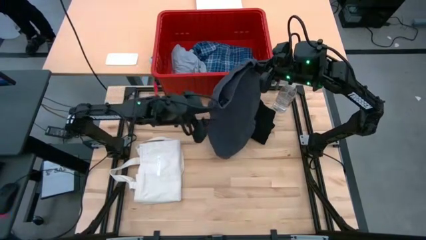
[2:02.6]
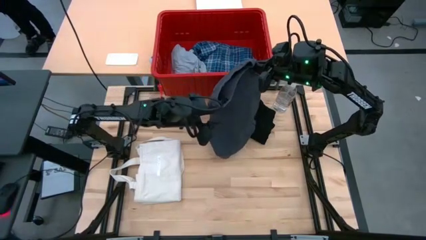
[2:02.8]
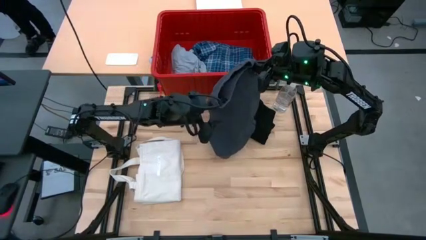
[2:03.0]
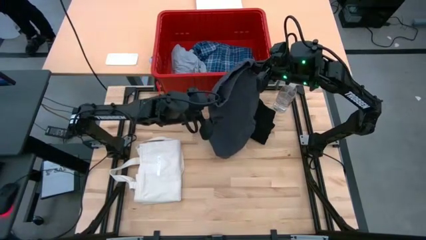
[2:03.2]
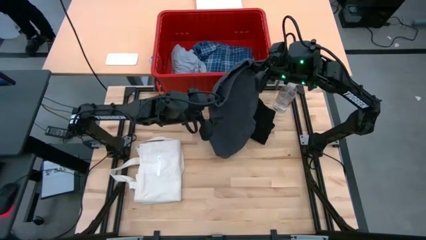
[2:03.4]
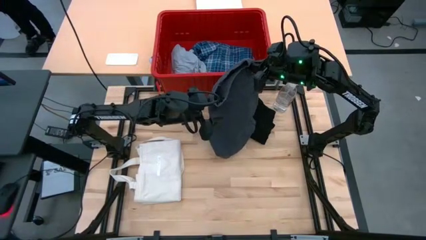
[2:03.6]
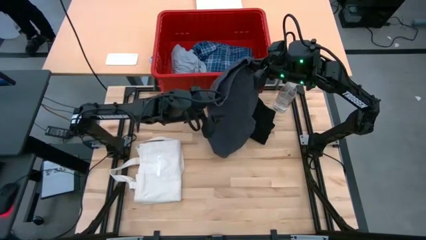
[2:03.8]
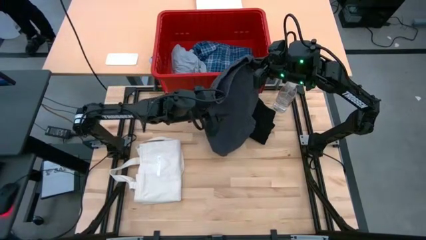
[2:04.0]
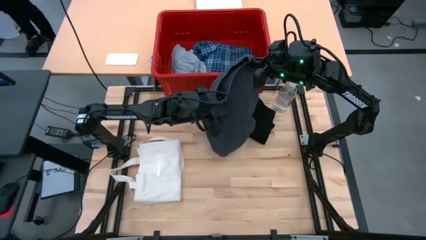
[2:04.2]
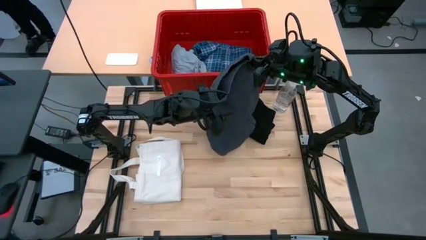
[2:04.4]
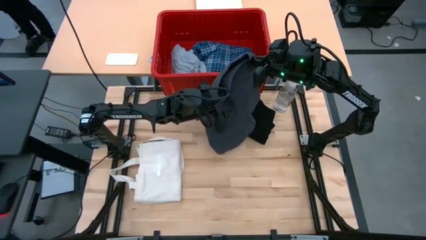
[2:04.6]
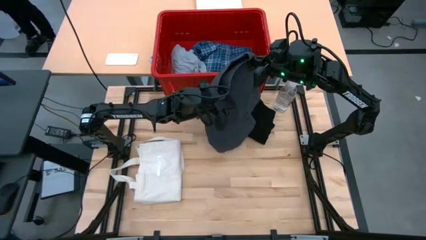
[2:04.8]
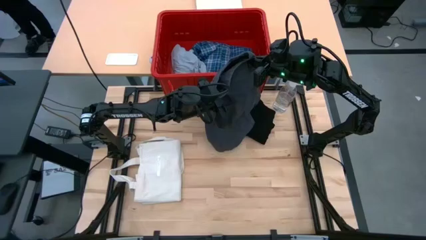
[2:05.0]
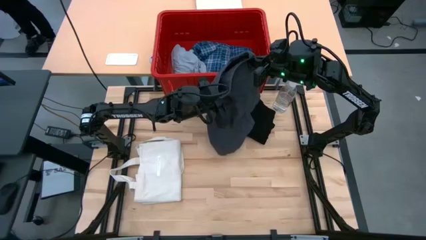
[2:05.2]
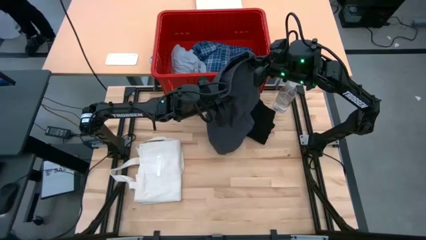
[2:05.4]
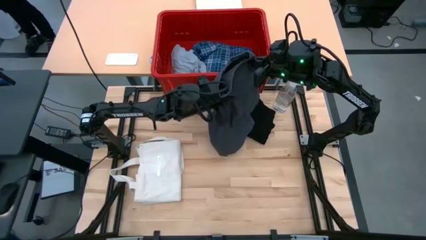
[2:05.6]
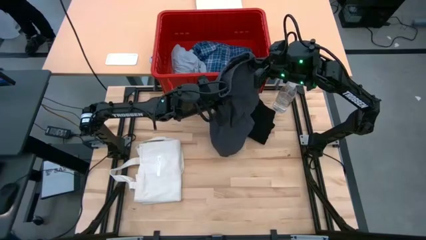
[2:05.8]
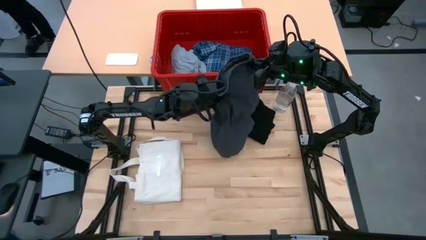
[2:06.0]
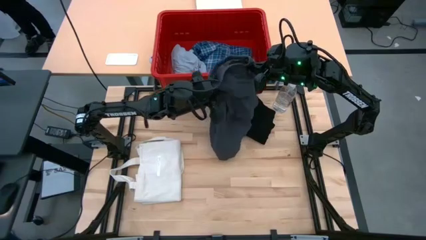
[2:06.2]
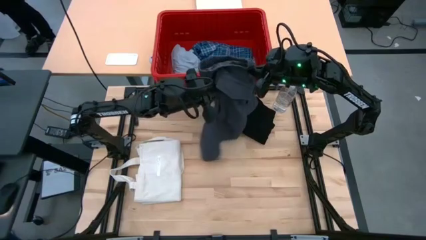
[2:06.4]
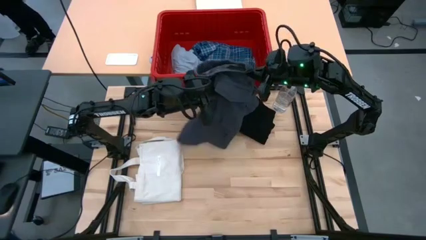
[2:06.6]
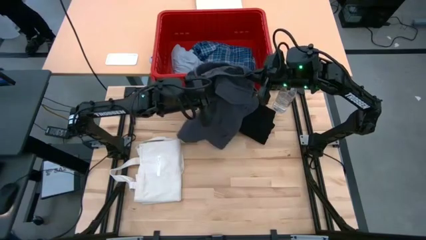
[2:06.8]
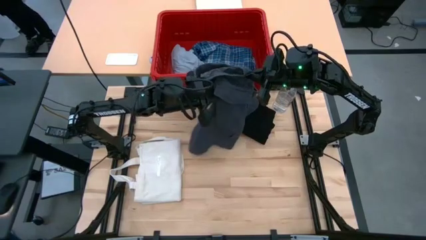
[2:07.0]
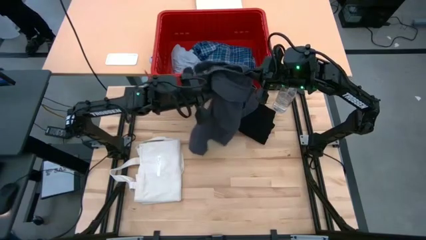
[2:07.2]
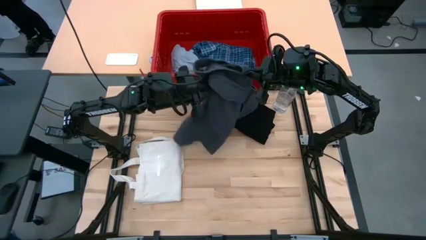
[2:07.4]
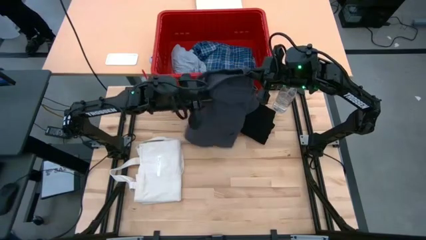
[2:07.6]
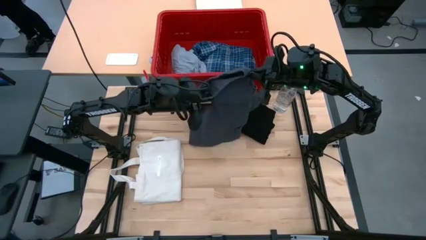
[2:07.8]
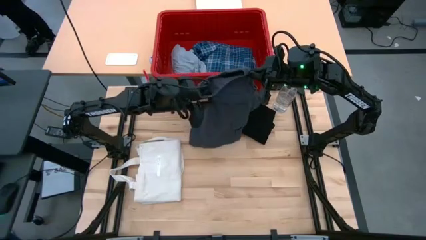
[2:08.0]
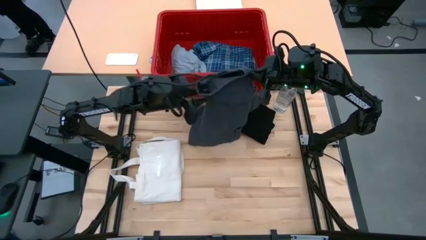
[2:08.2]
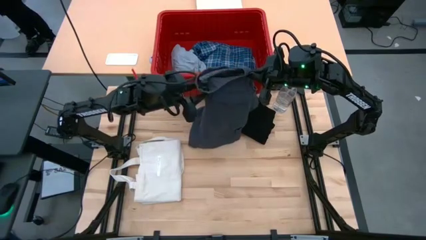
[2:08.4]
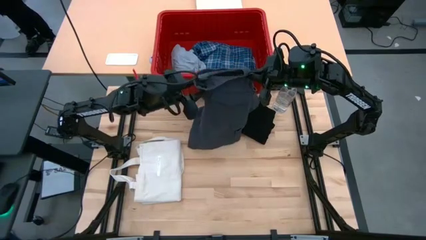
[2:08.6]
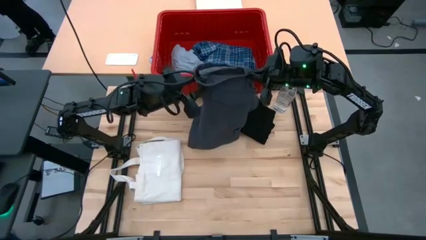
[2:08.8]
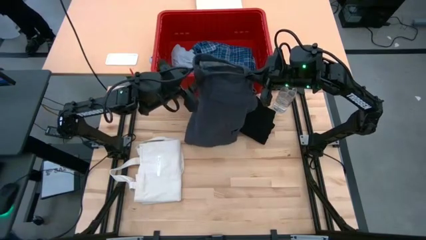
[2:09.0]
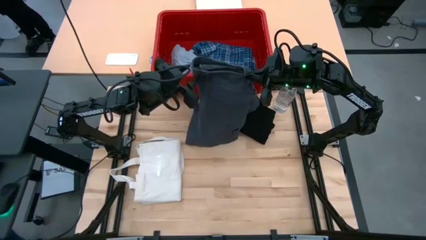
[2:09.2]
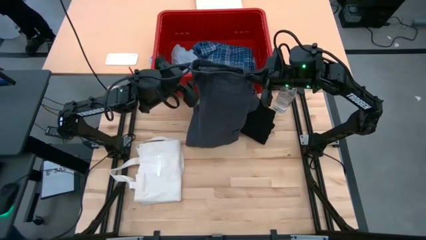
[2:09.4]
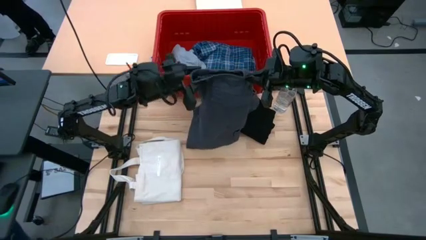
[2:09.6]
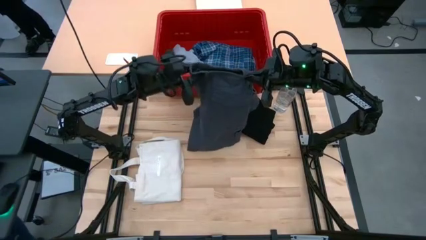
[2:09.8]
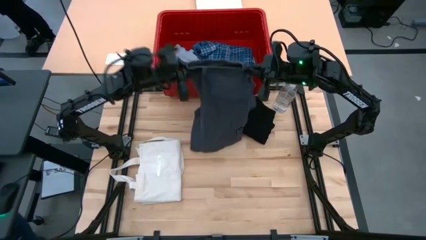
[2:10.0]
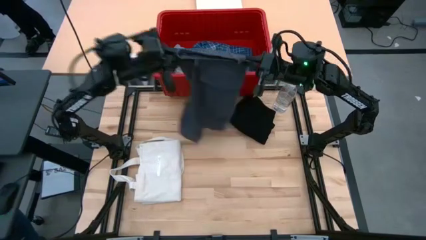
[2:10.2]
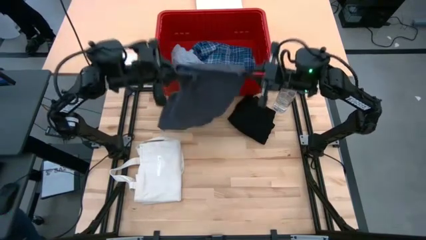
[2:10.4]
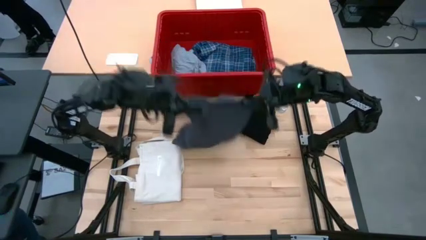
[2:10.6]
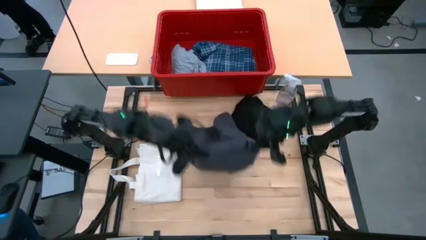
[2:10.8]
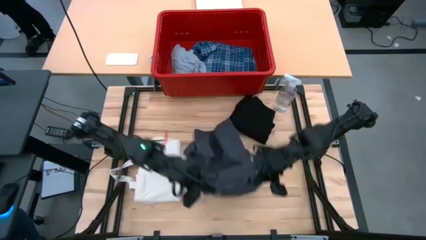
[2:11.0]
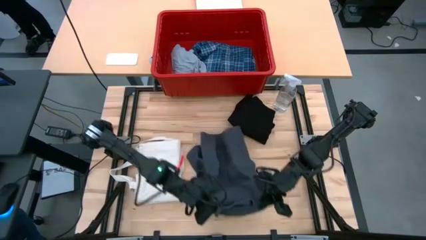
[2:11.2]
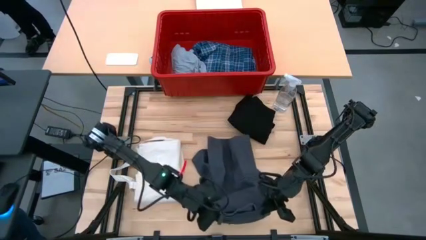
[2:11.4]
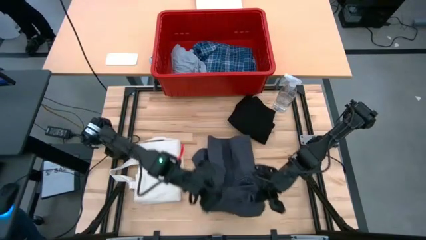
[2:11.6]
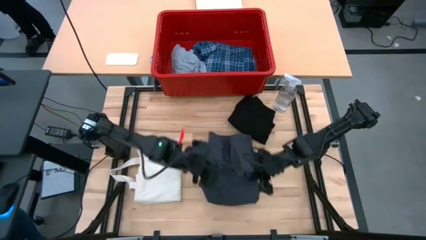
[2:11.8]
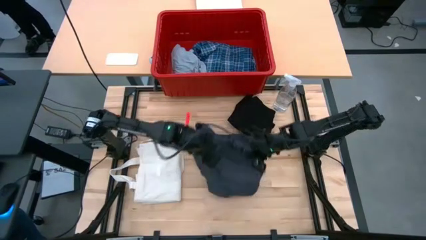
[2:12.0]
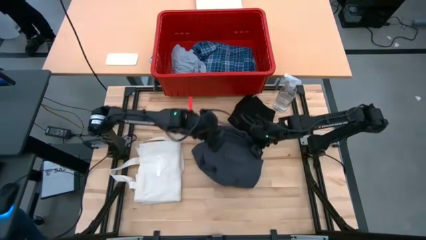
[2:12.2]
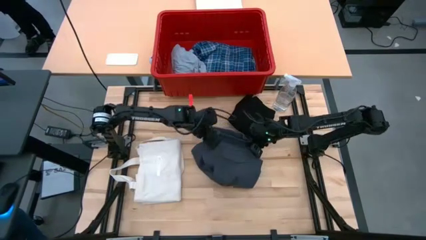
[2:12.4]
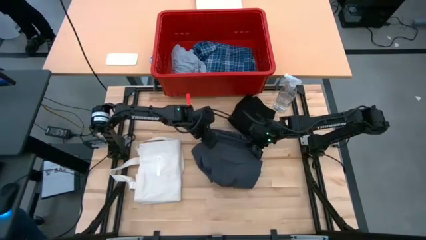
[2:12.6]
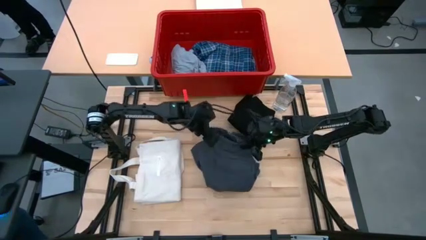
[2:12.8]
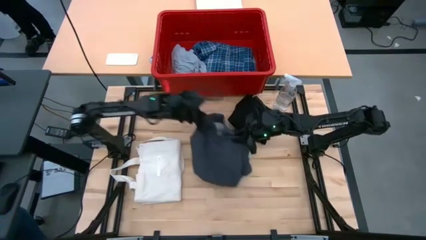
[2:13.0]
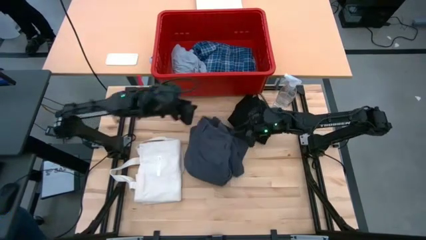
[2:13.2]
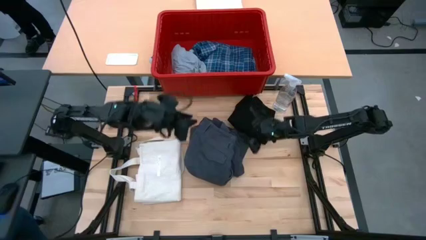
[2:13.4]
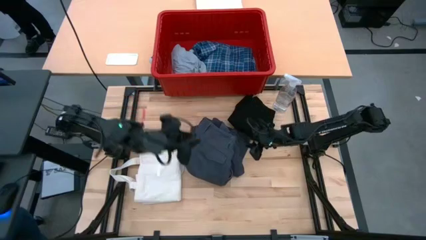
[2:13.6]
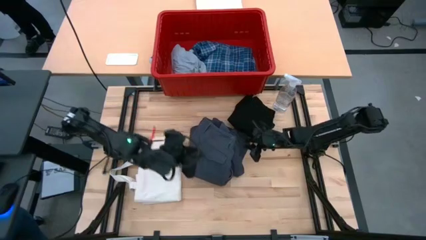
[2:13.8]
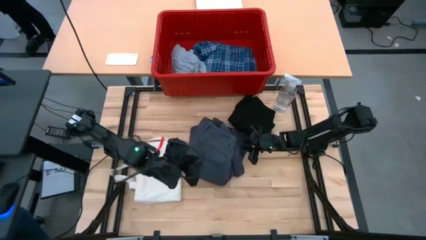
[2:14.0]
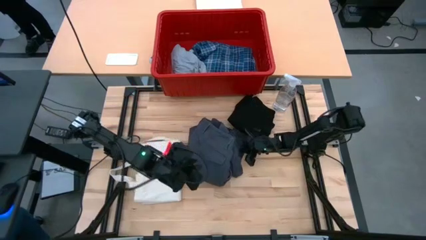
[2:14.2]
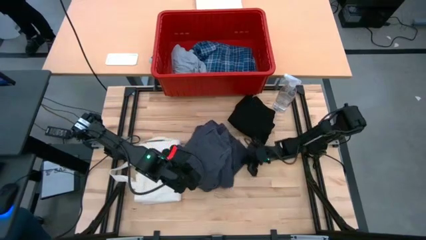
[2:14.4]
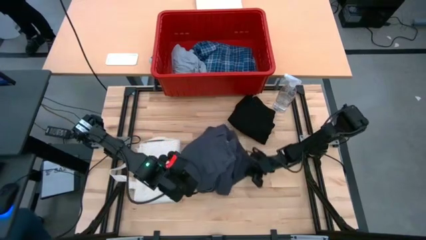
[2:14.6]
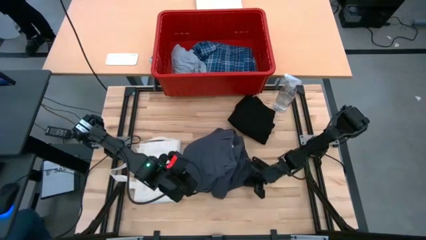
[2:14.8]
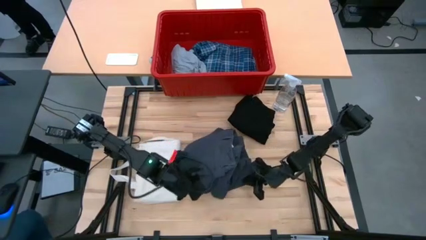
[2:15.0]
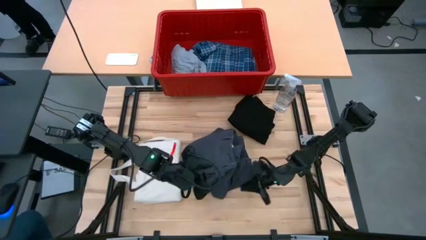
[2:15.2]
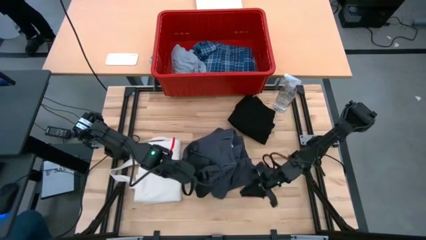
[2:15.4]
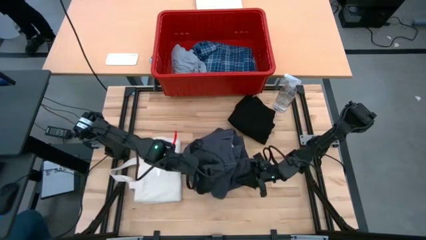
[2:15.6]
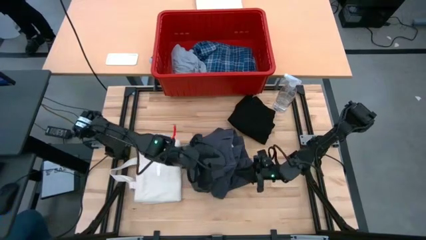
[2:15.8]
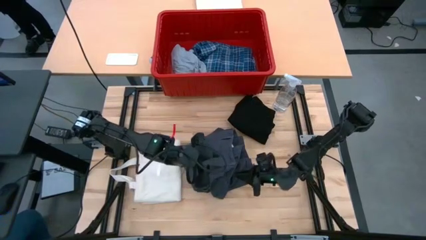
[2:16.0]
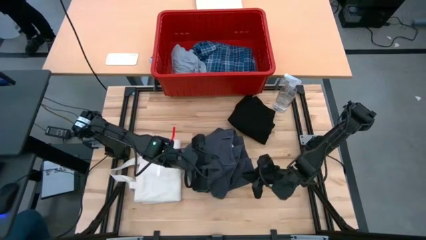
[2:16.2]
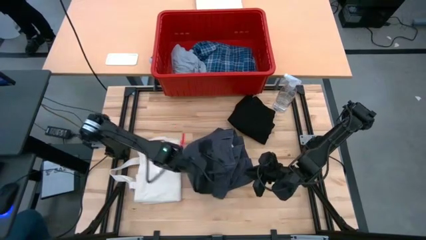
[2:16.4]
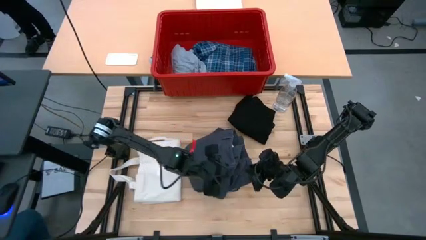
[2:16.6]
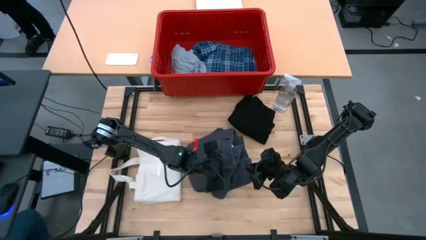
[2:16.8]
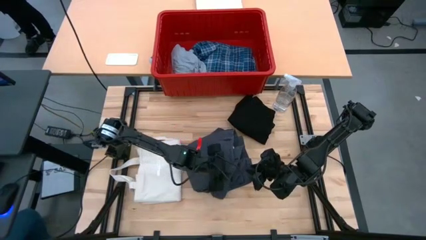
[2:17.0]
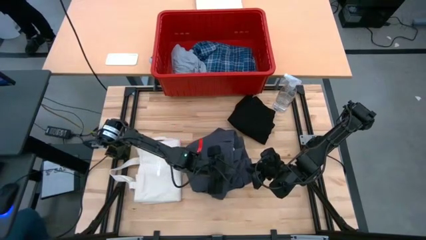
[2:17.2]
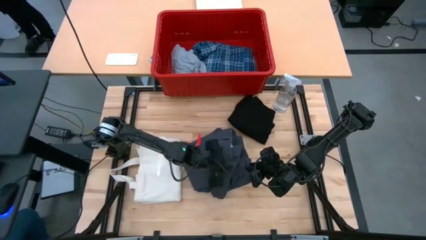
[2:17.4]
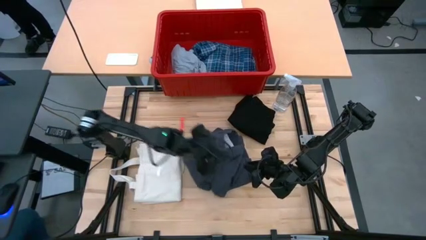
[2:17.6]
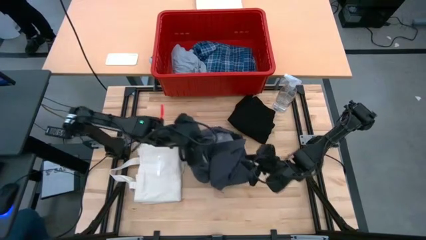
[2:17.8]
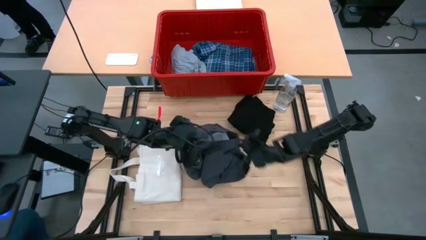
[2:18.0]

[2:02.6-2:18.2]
Task: Fold Laundry from Bin
Fold the gray shorts

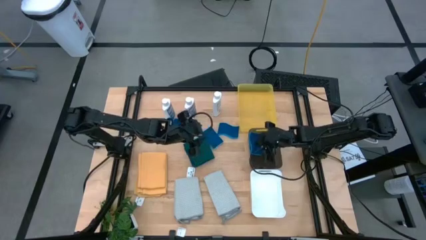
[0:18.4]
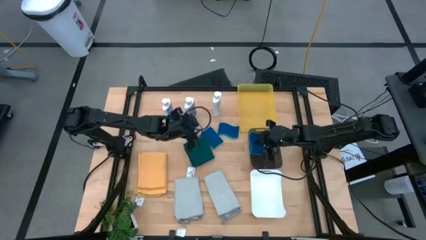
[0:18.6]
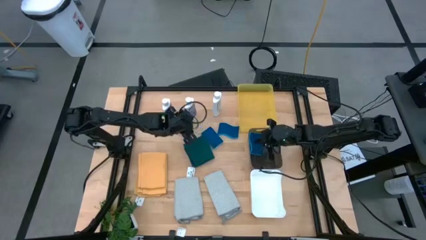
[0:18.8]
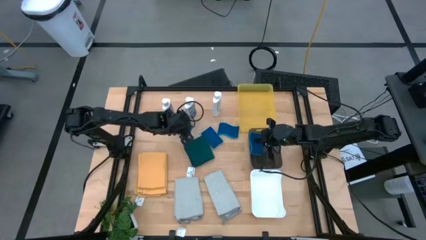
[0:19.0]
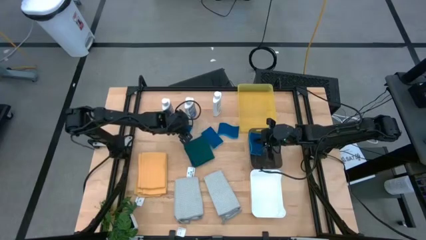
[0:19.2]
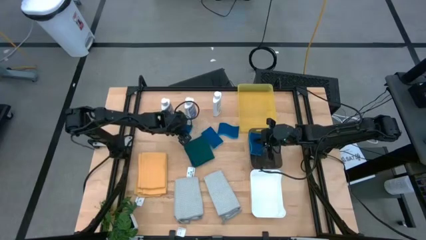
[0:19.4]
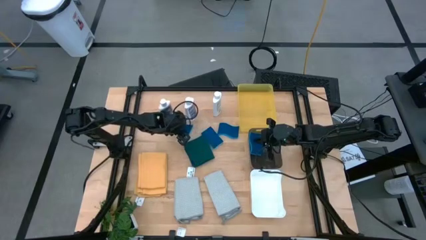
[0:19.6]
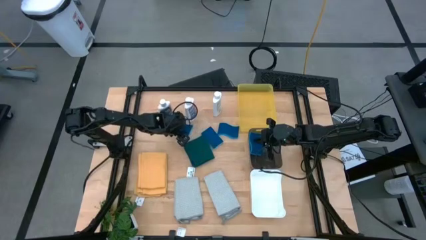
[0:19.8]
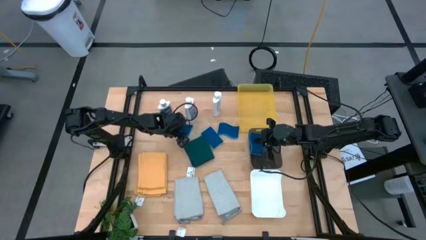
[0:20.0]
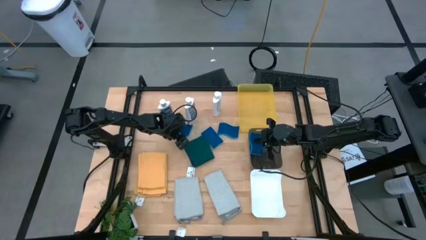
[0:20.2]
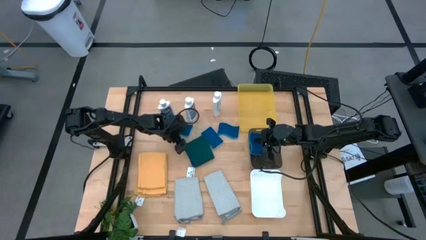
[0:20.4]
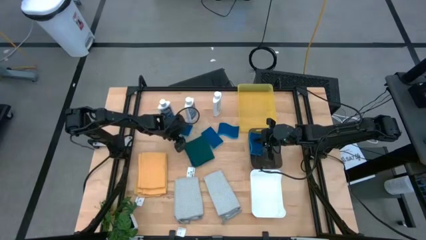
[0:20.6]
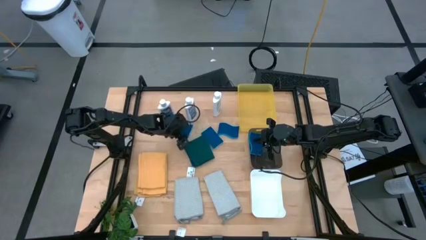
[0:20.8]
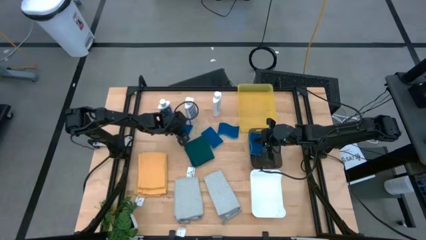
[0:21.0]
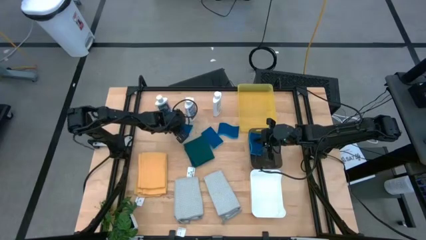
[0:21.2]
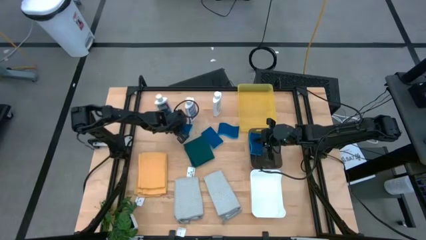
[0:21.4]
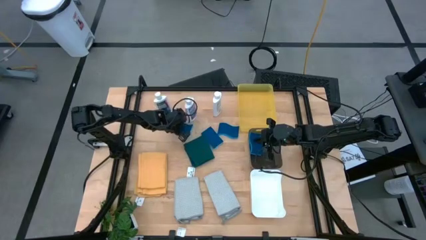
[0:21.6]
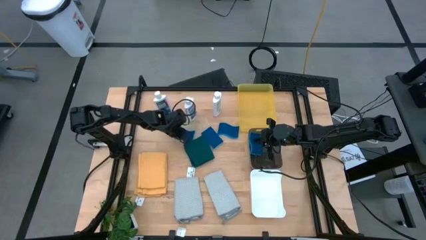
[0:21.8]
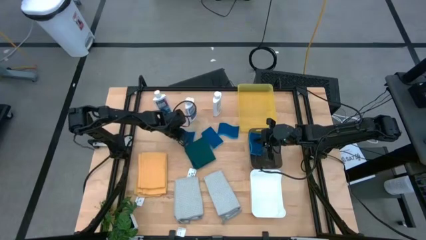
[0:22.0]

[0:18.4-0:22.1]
Task: Pick & Place Kitchen Items
Put the blue sponge into the black bin
